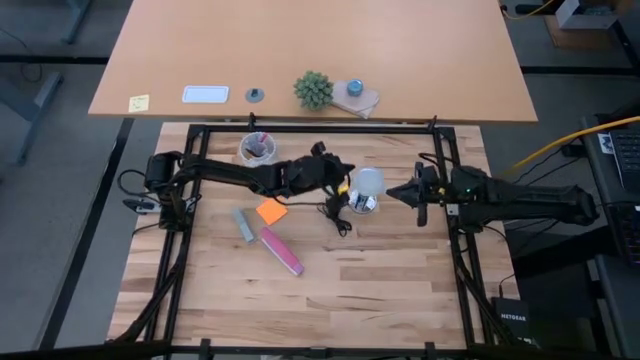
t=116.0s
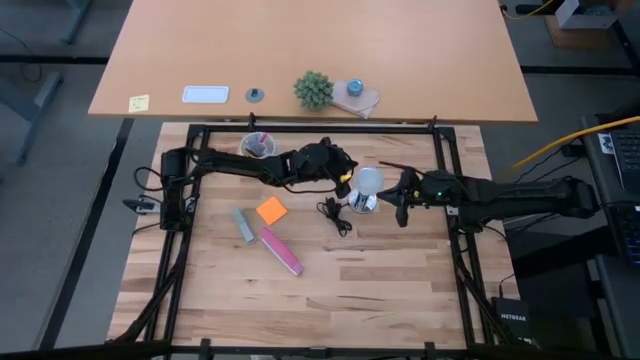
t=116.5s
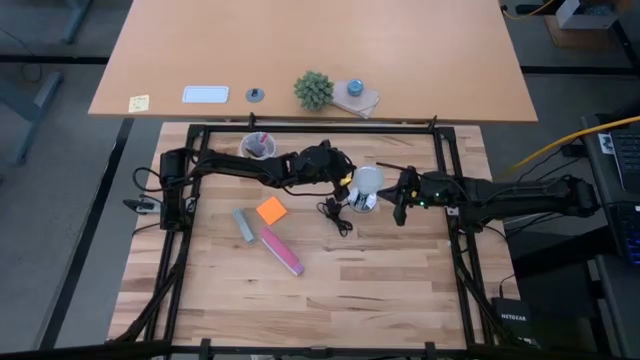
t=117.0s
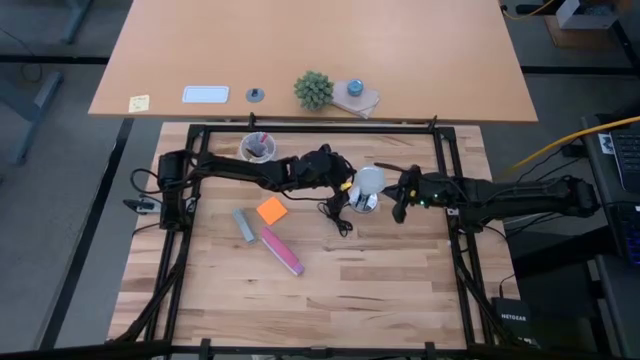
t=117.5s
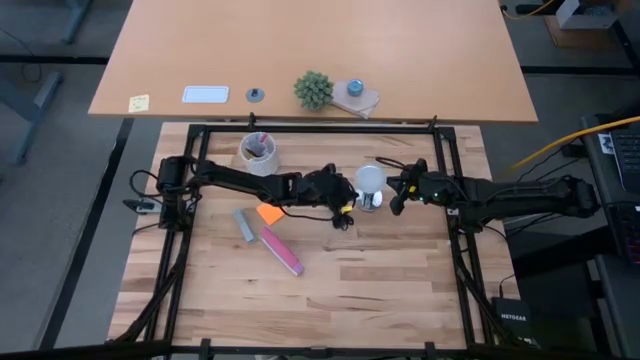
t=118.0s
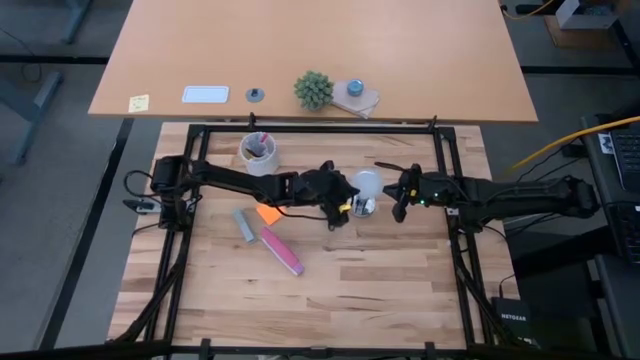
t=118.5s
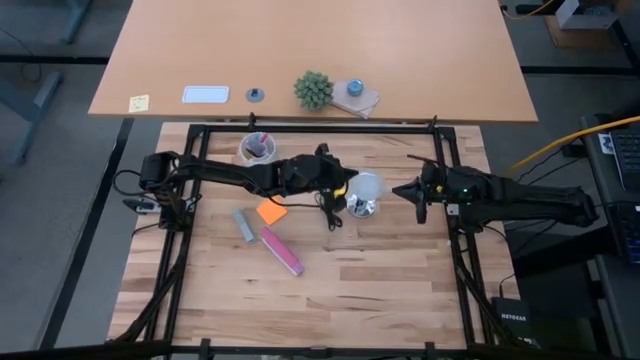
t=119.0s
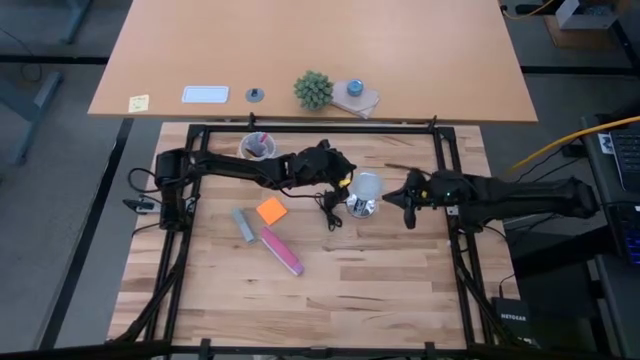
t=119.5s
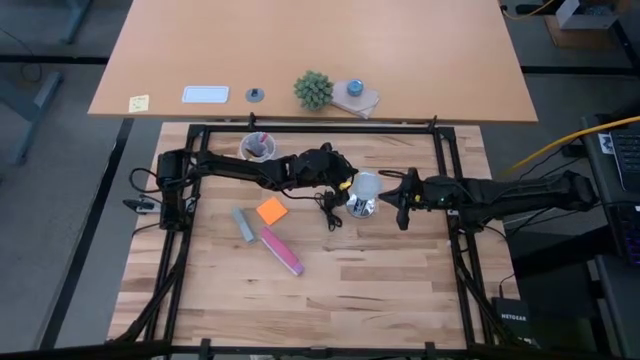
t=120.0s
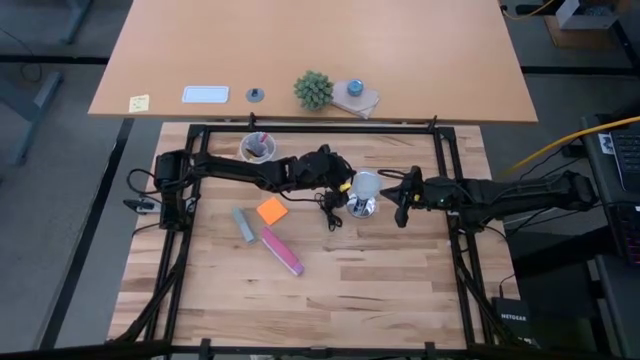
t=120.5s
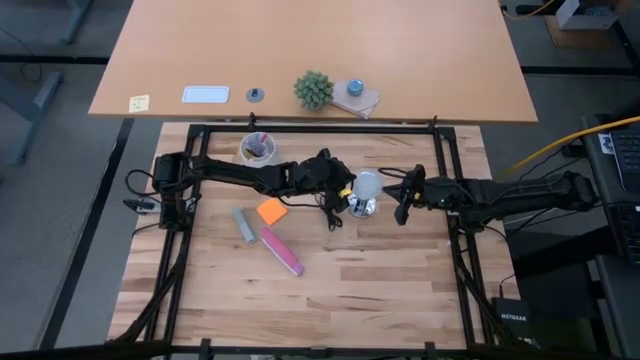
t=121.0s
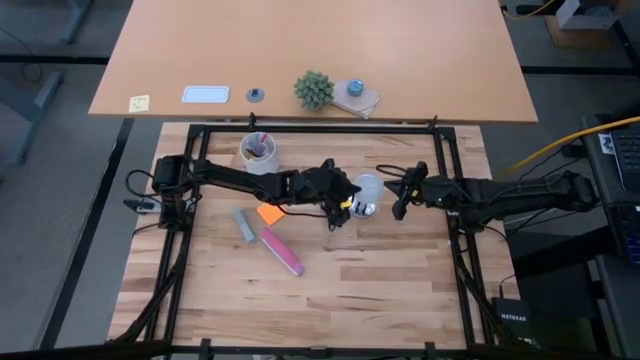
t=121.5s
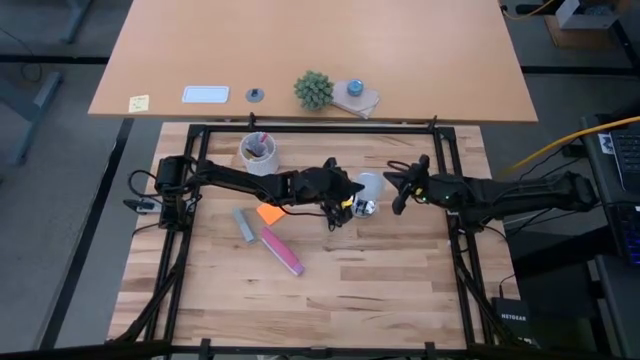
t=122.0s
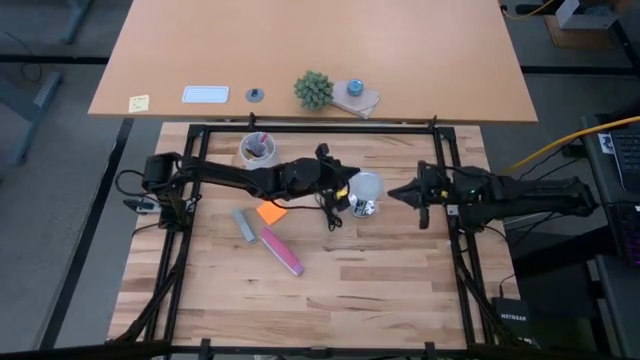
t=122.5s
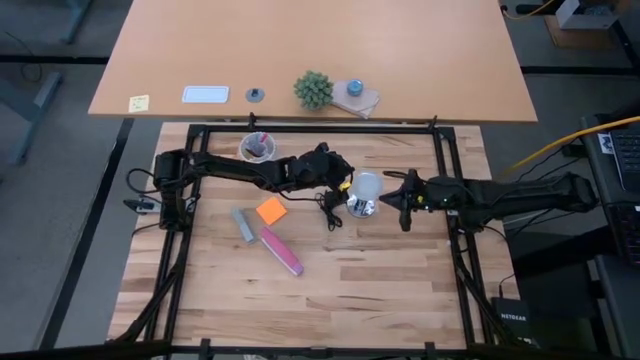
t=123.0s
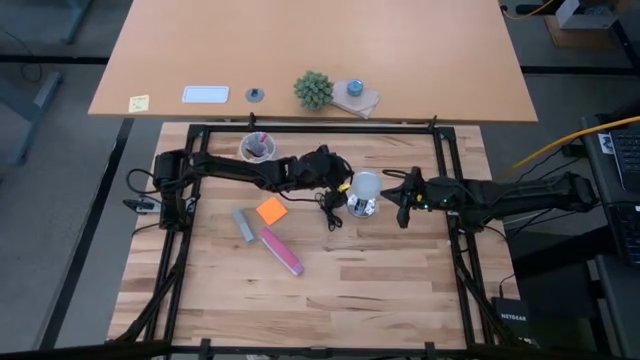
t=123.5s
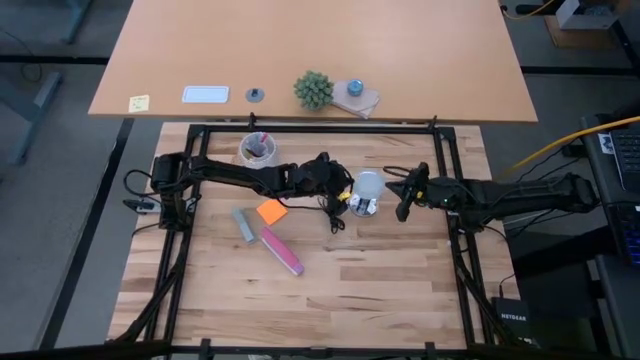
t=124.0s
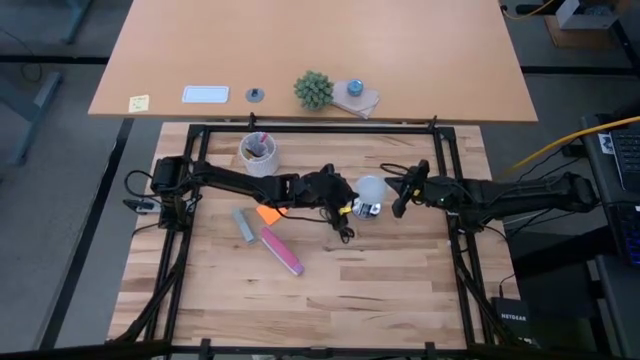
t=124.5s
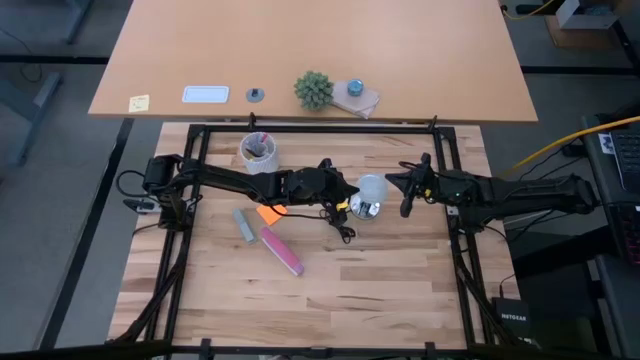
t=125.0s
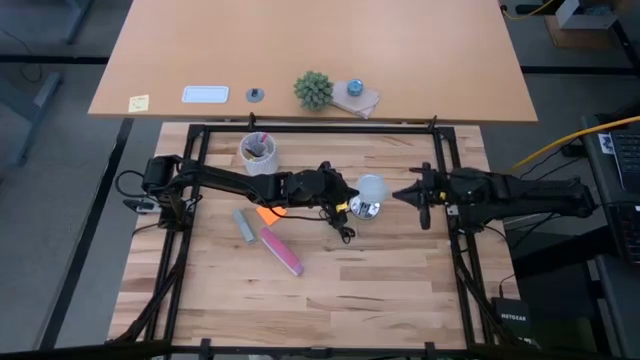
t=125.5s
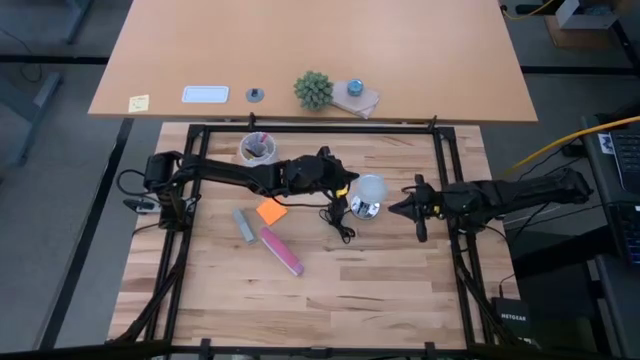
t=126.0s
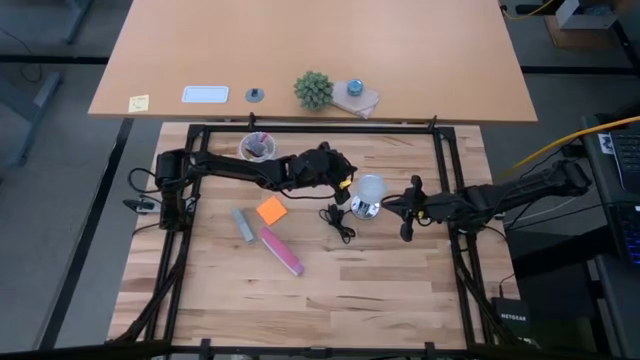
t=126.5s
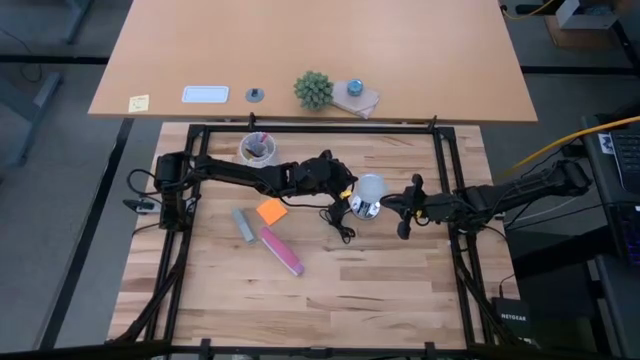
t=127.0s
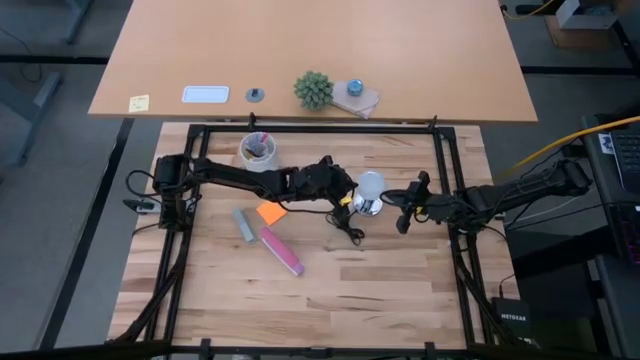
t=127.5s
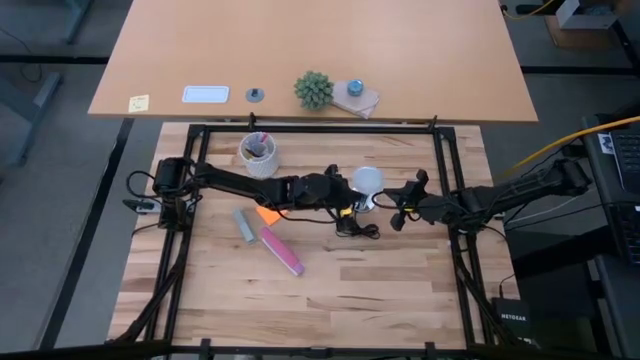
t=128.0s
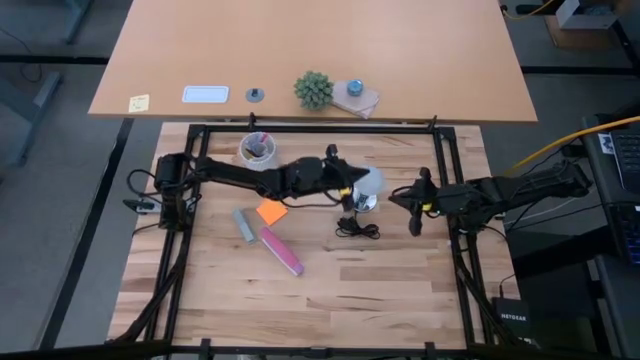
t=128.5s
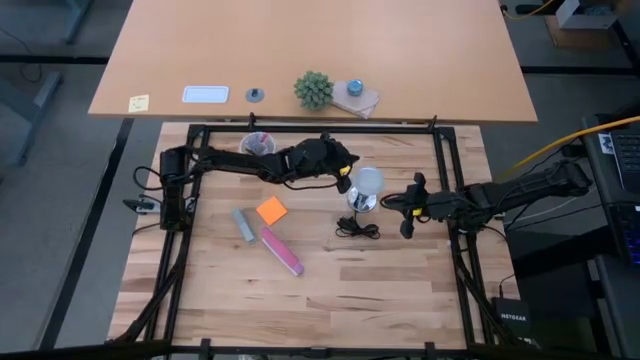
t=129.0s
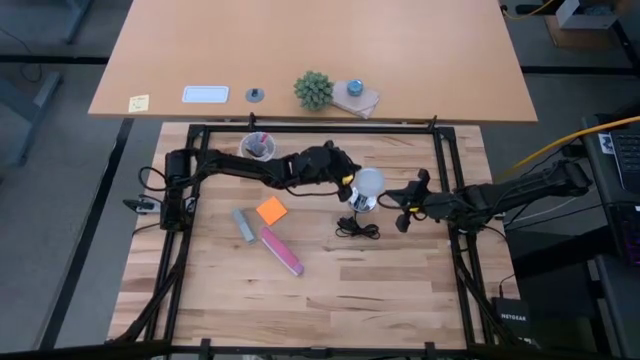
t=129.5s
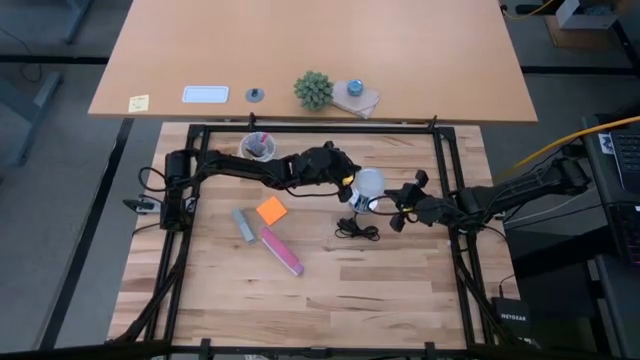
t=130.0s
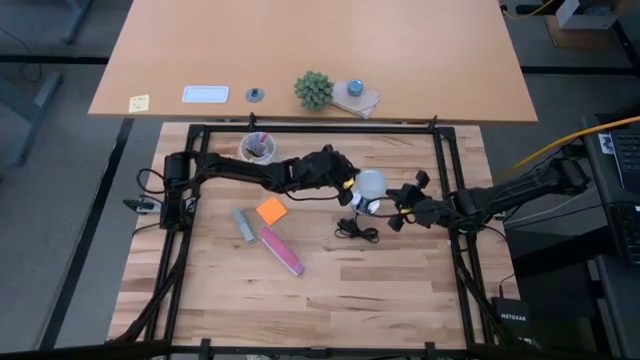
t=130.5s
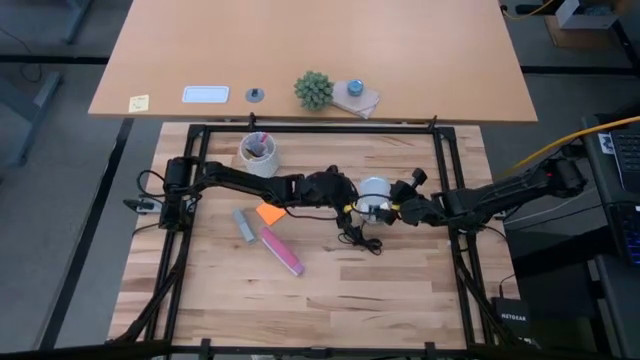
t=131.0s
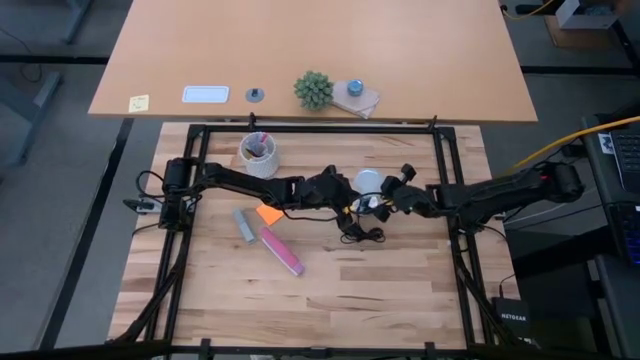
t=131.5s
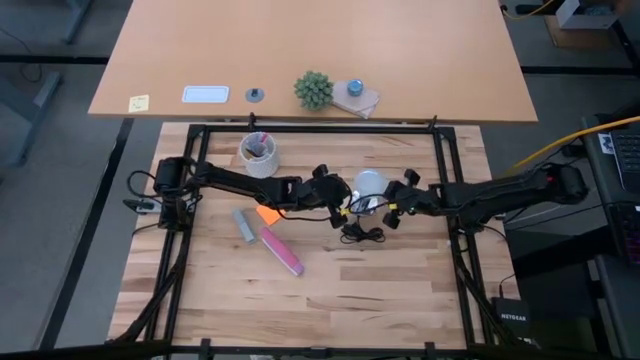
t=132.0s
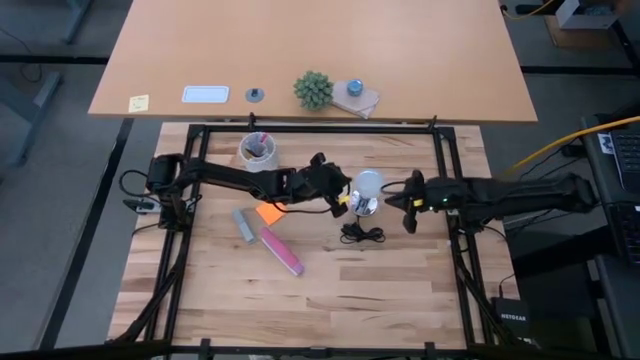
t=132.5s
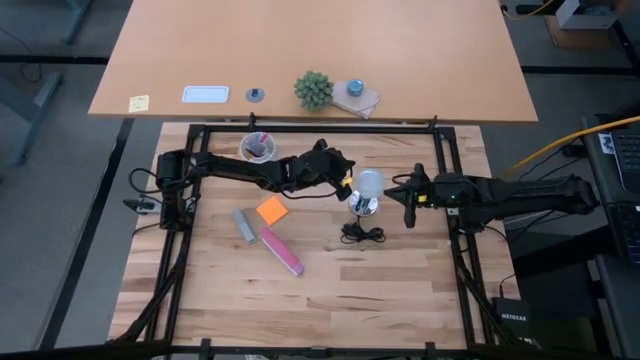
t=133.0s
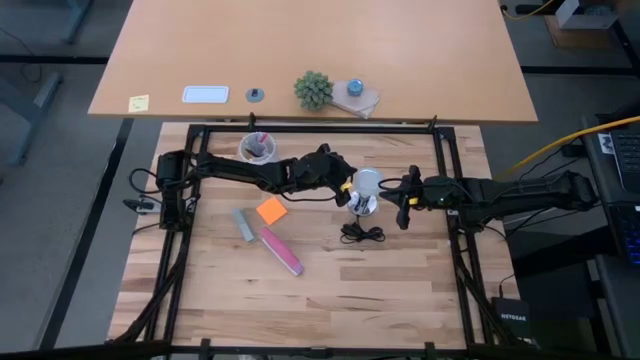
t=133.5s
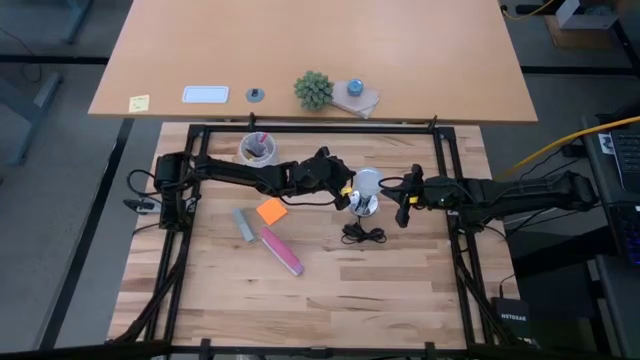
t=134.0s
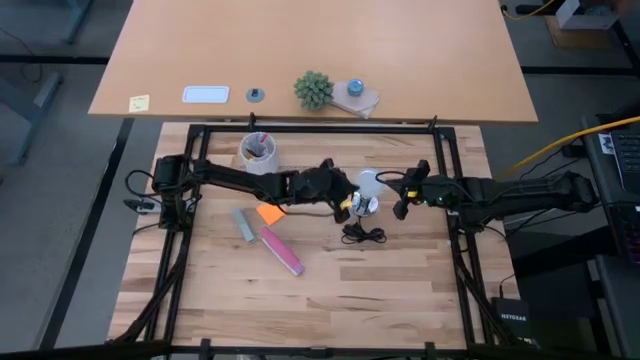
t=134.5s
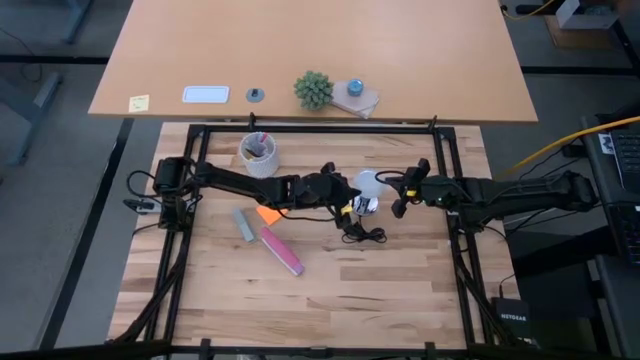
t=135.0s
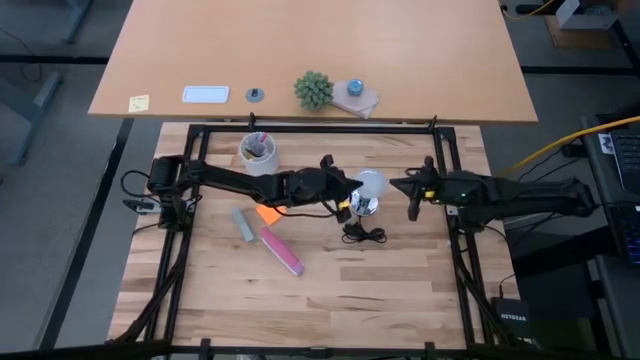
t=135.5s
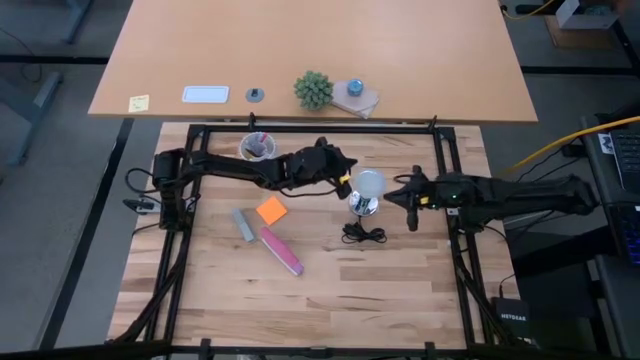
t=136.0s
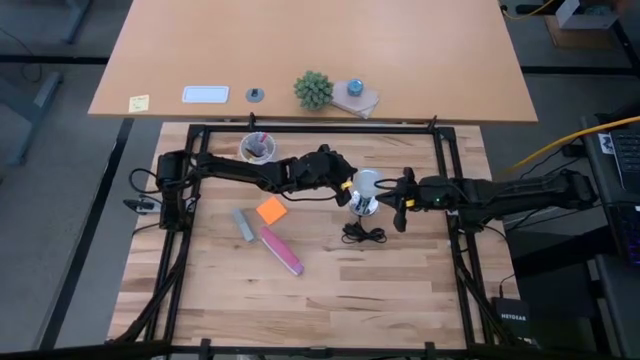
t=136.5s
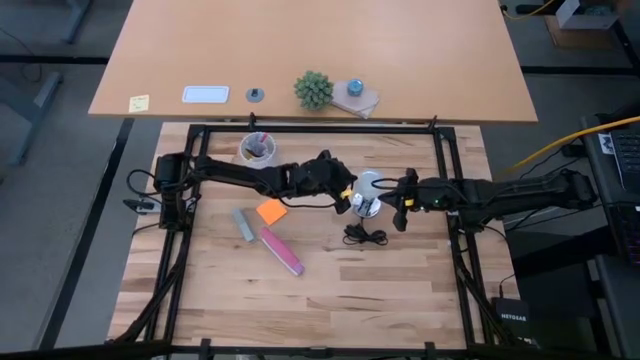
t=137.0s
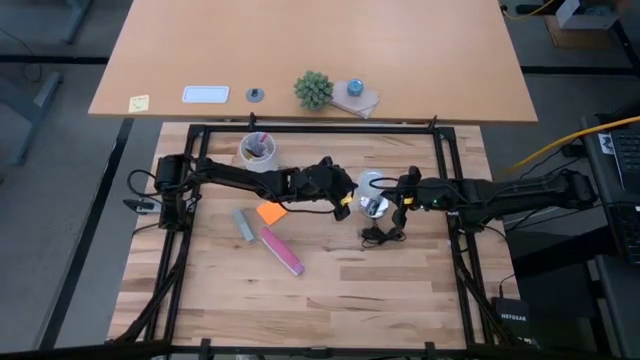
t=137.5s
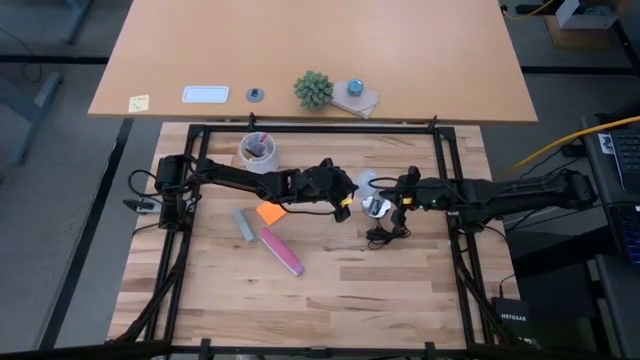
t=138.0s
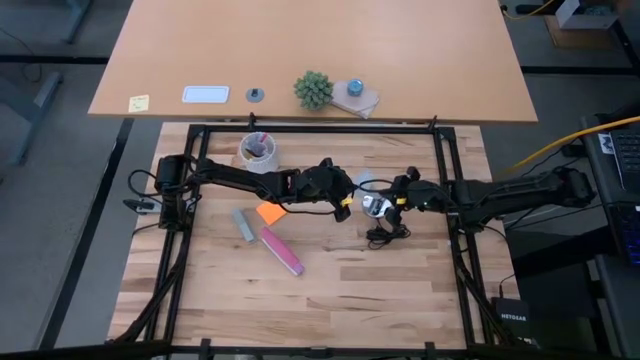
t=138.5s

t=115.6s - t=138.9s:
Task: Screw lightbulb
Remove the lightbulb from the lamp
